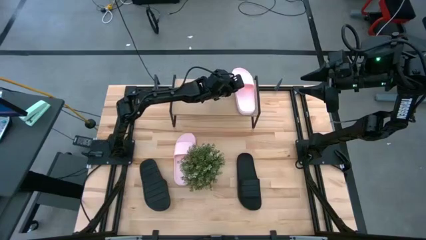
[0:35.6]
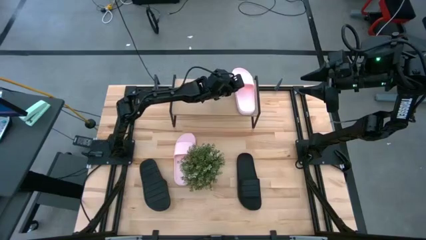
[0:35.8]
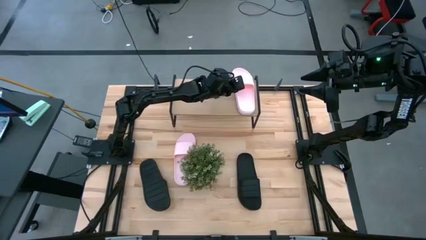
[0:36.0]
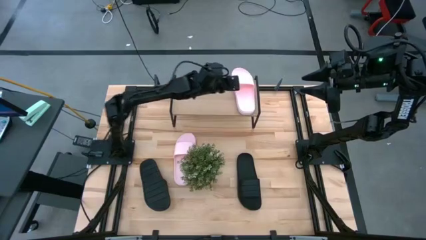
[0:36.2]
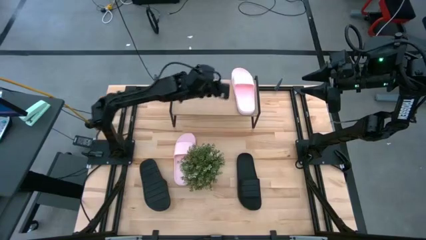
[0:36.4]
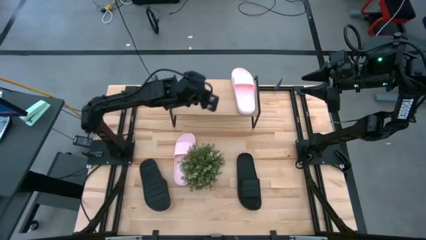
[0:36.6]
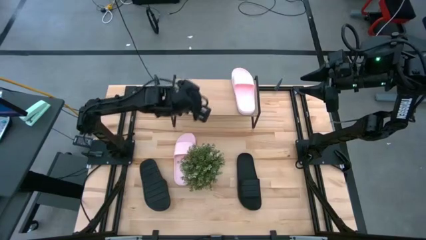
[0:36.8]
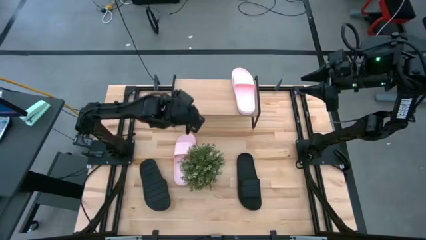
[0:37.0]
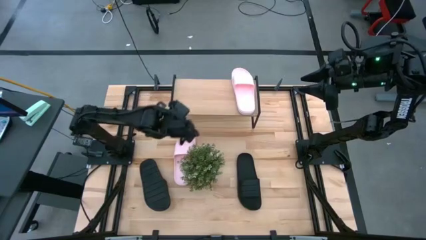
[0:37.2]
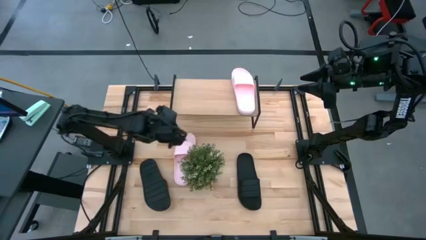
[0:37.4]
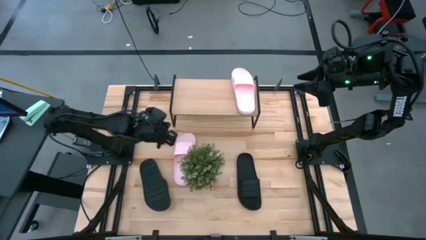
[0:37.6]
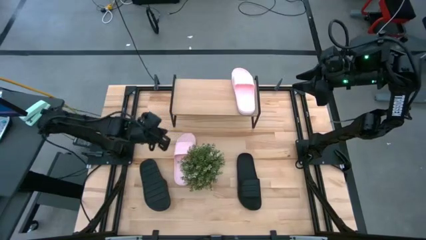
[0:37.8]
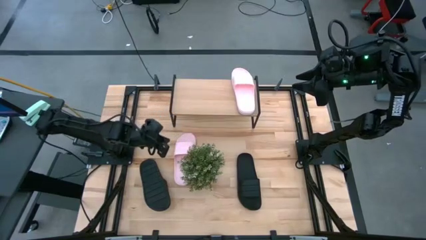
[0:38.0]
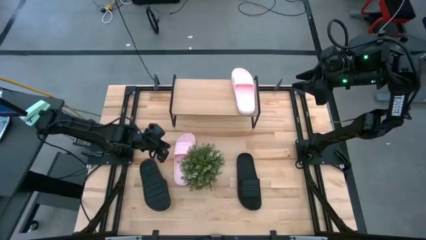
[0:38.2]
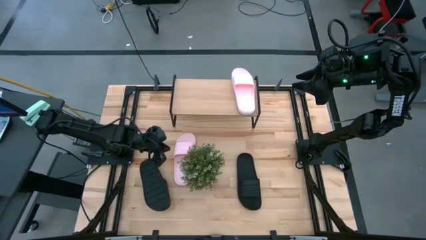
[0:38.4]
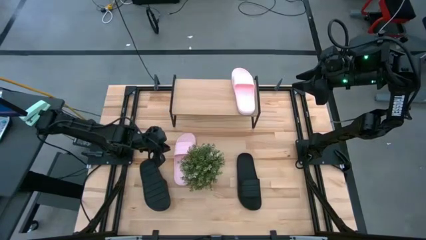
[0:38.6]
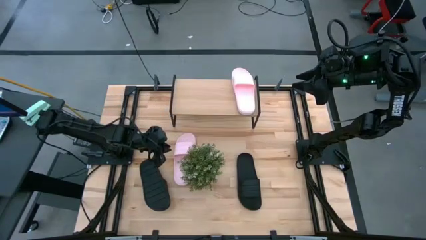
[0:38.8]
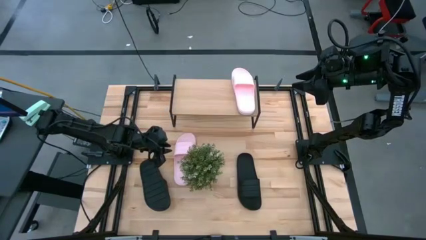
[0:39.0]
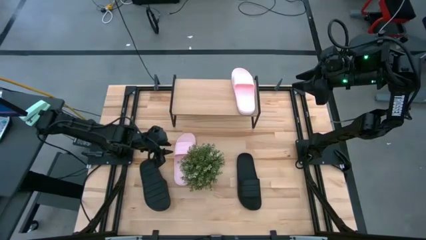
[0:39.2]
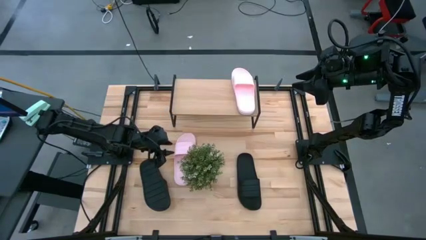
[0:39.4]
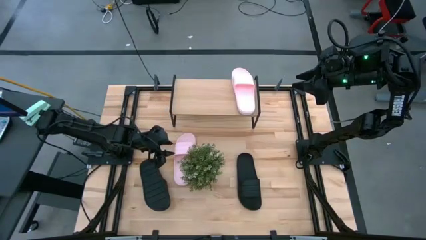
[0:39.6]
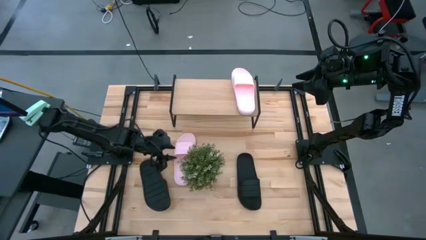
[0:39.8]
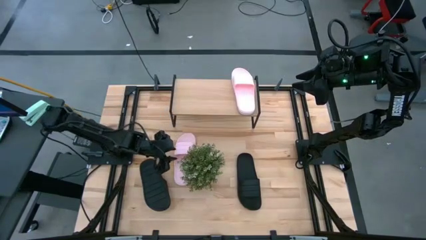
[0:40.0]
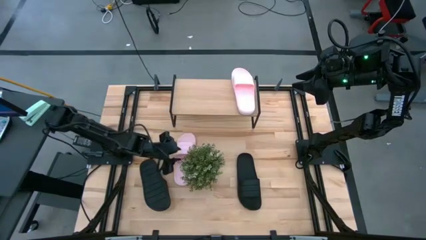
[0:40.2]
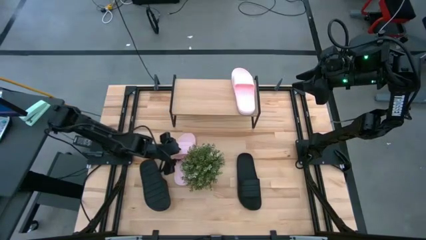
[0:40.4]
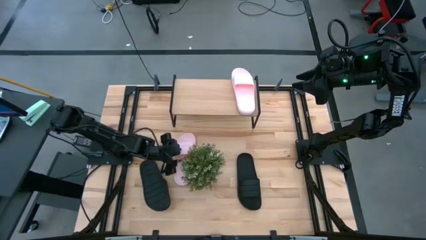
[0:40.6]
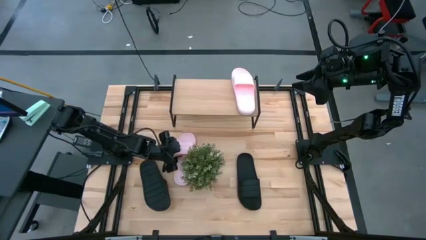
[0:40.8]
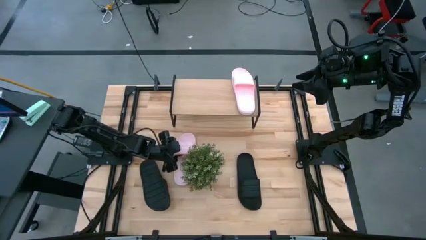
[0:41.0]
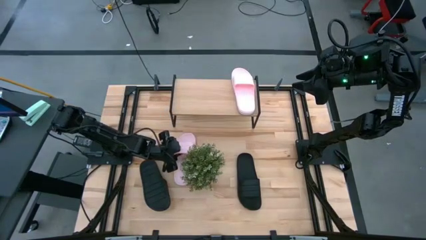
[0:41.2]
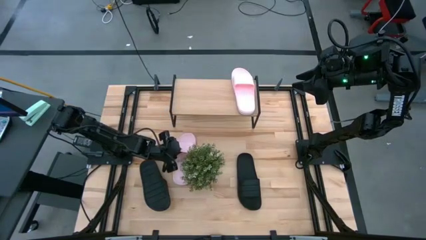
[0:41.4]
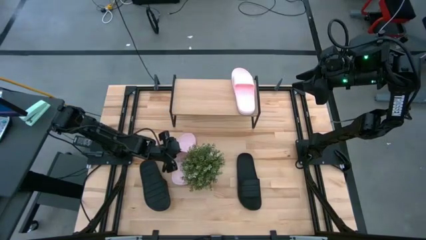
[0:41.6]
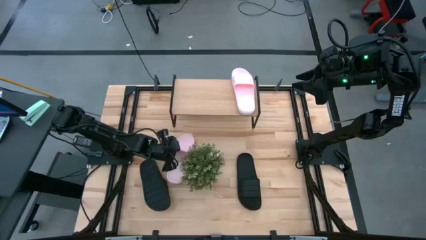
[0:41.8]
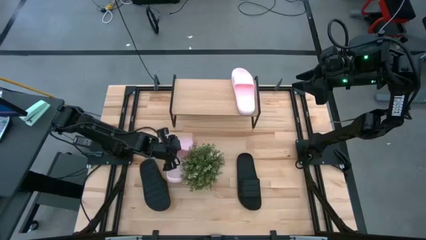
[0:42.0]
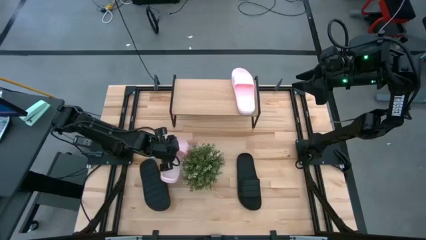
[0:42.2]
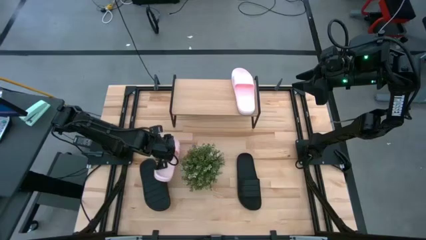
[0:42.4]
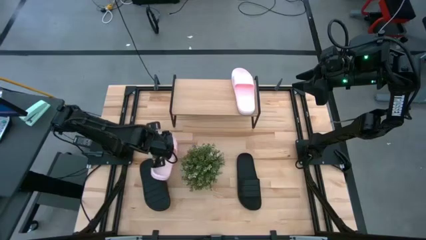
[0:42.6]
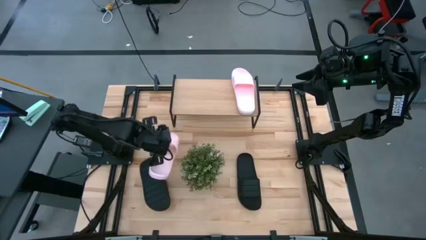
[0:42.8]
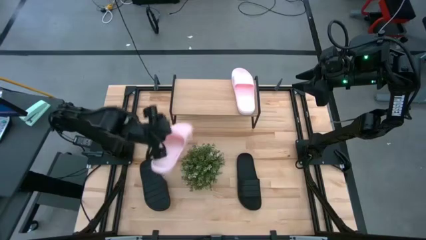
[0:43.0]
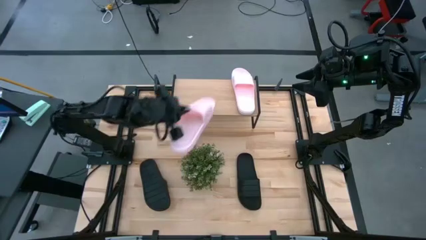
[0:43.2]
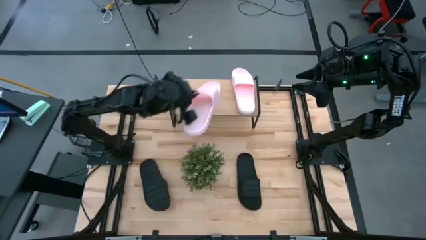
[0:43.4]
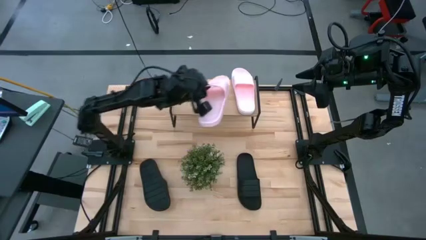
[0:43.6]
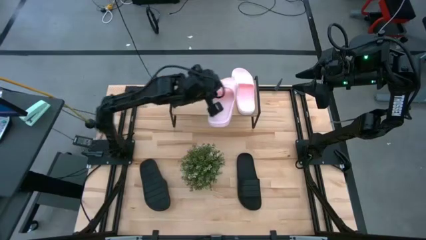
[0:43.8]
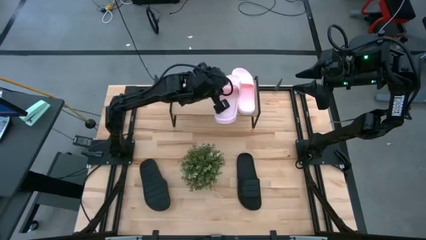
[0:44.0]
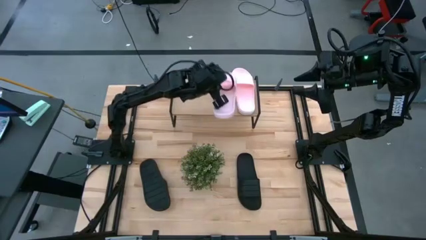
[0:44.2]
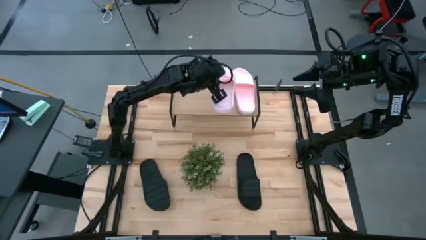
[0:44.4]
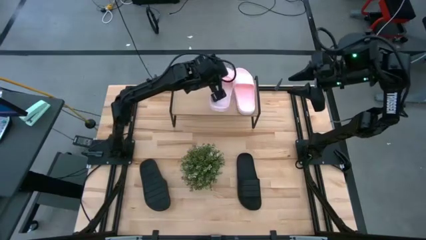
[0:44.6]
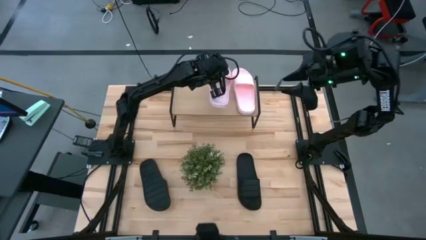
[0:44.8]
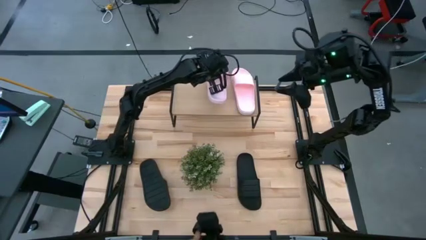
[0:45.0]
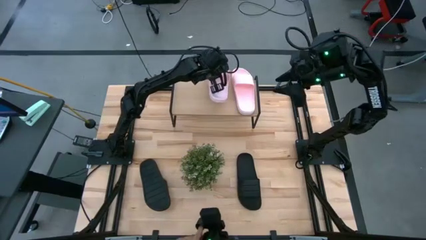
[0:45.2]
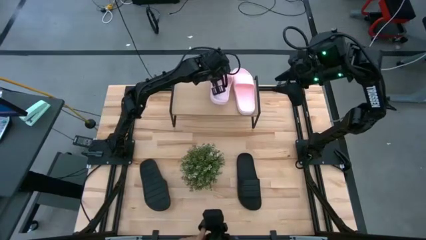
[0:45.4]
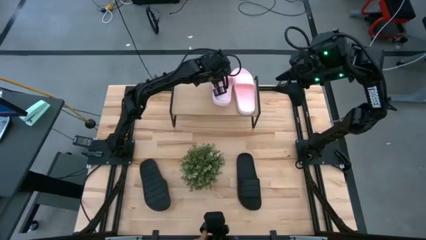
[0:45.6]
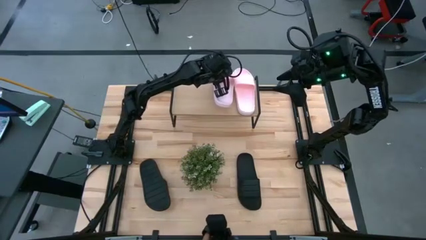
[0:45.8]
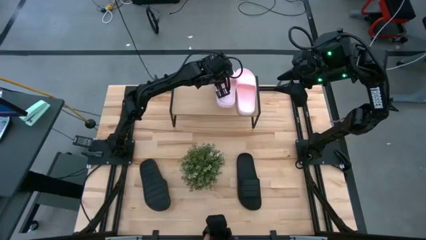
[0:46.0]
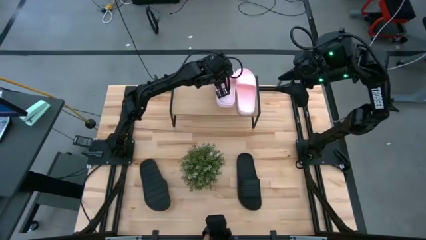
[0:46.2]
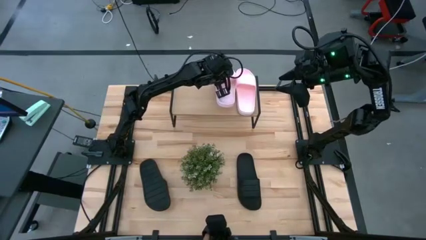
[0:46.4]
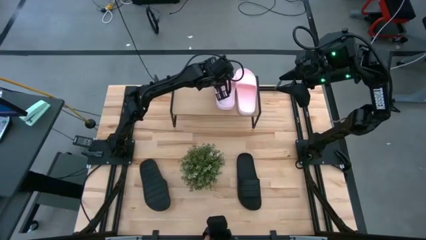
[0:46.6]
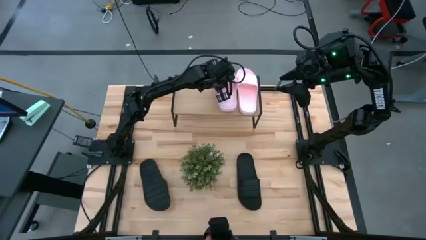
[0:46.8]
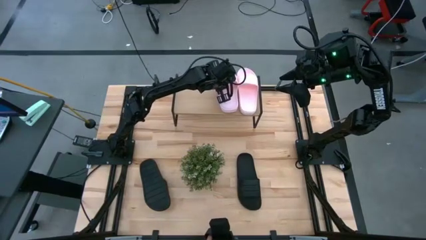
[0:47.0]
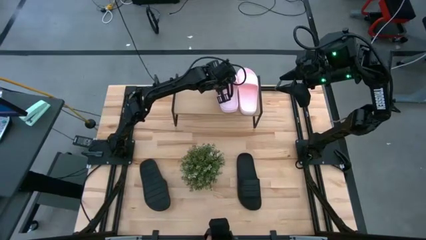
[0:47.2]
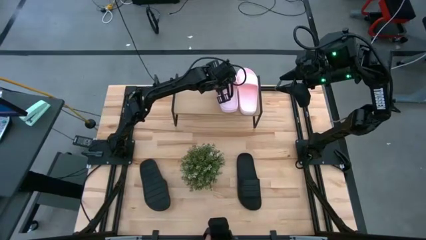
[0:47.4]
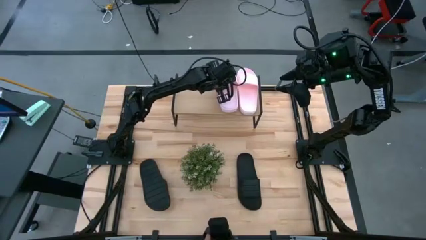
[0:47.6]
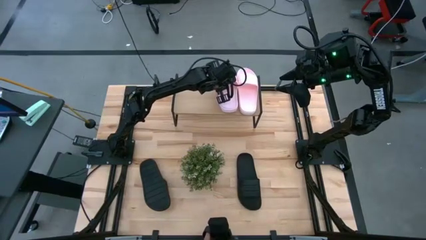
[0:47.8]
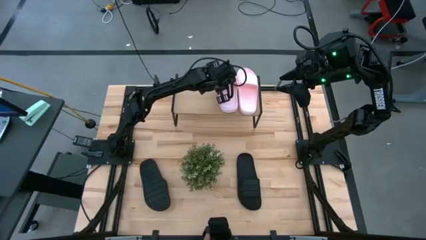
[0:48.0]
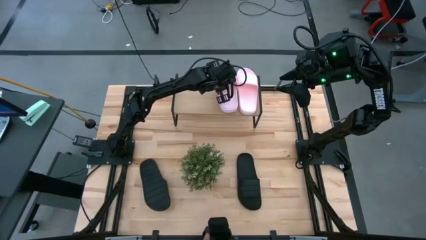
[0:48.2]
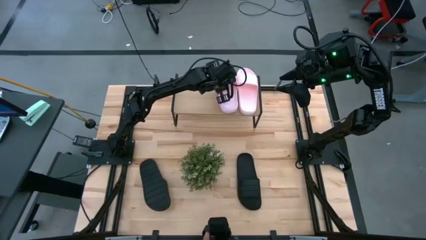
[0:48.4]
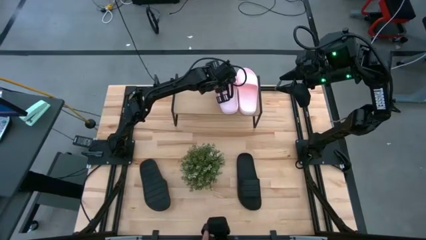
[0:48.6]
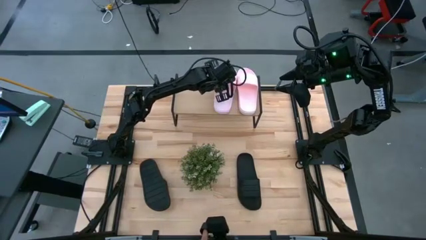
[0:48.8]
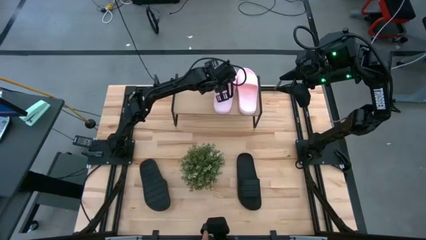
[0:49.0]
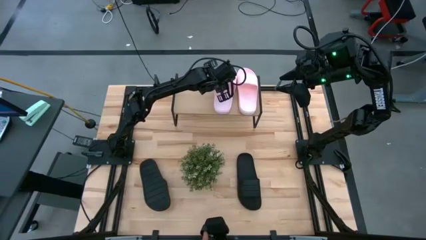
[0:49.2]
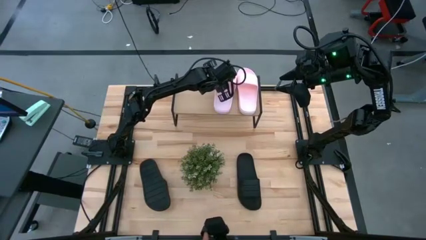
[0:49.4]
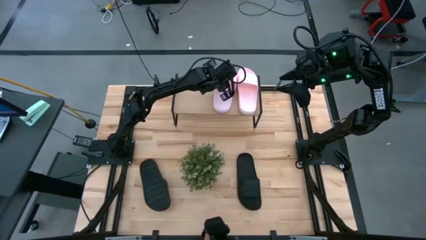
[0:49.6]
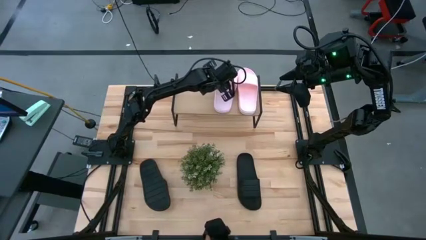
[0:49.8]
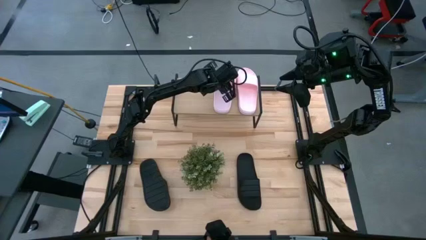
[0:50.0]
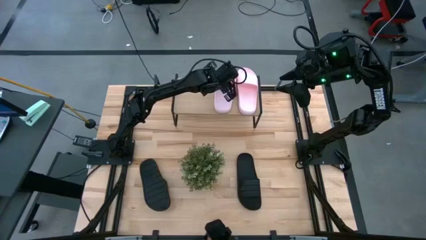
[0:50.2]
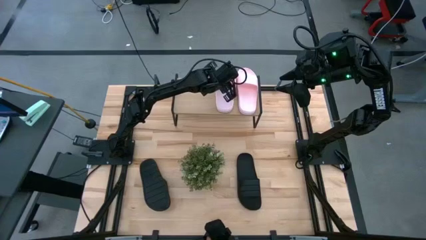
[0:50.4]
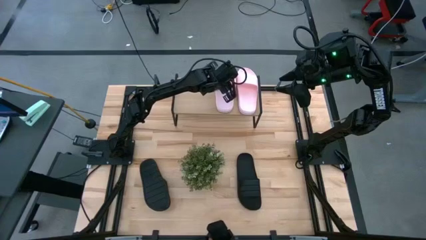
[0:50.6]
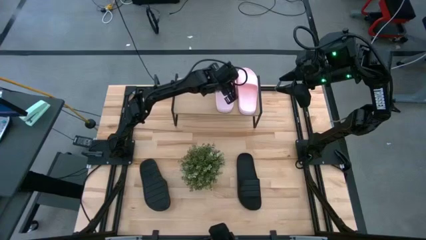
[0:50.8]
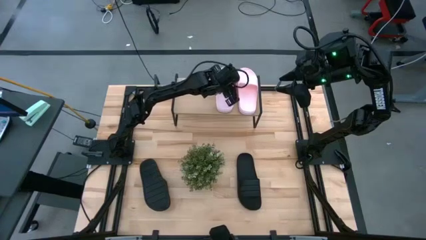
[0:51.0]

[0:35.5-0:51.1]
Task: Pick and place slides into the shelf
Put the pink slipper on the shelf

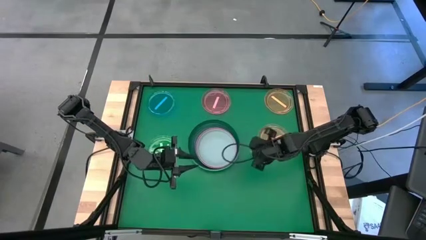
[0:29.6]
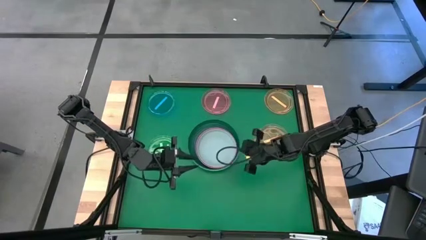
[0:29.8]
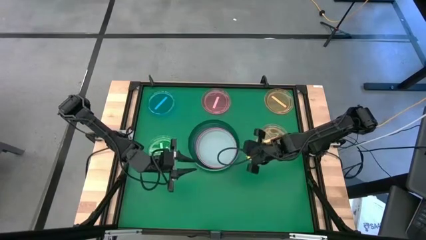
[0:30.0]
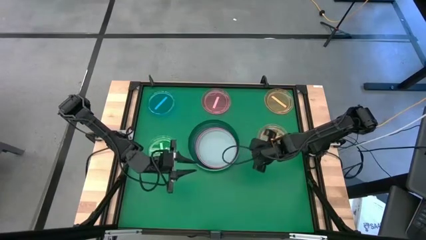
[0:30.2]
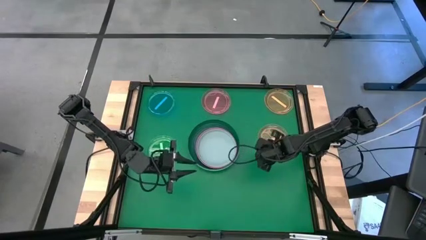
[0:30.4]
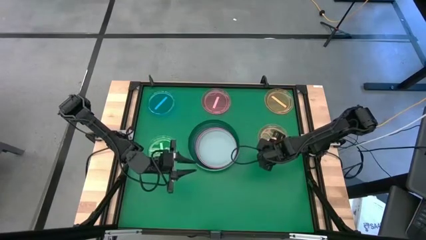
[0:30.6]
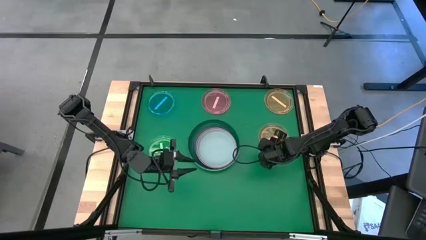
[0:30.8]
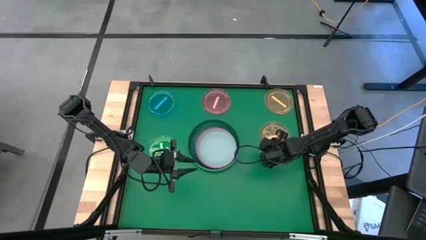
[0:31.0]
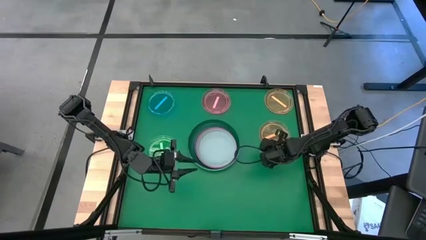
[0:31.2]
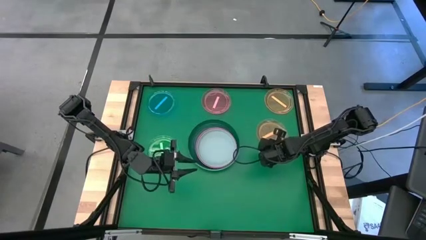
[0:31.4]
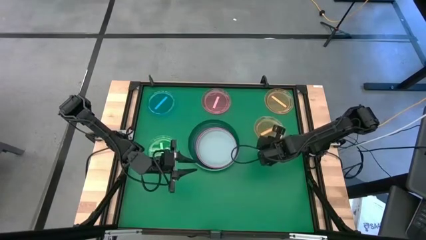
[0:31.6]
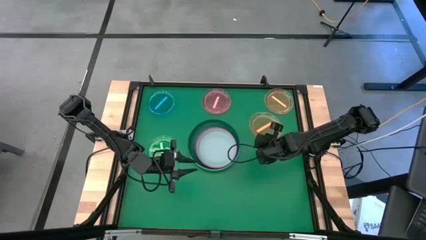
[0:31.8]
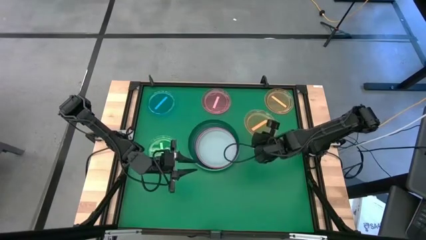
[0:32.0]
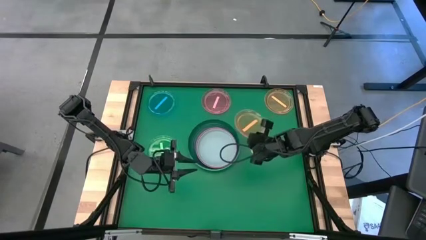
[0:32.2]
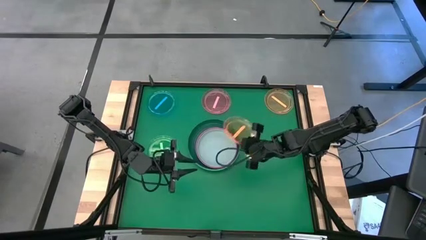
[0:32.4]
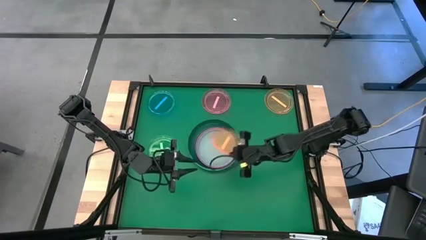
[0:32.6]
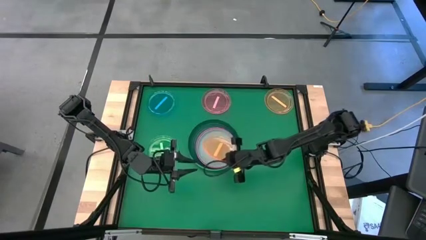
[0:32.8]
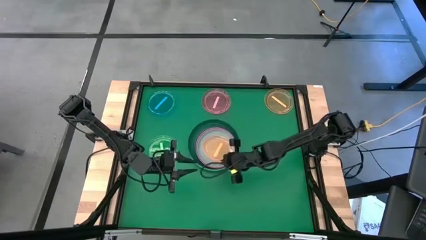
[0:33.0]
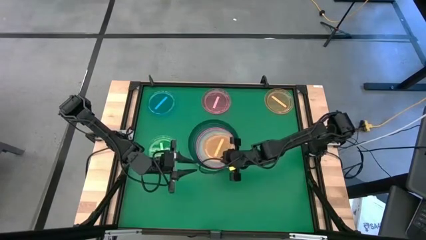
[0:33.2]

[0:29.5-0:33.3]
Task: Stack plastic plates
Stack the bottom orange plate on top of the gray plate
